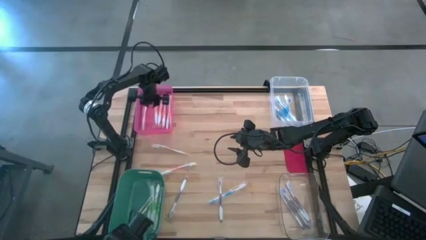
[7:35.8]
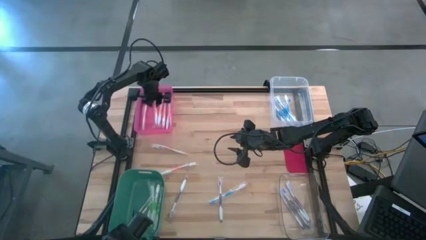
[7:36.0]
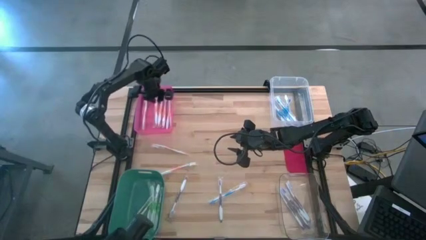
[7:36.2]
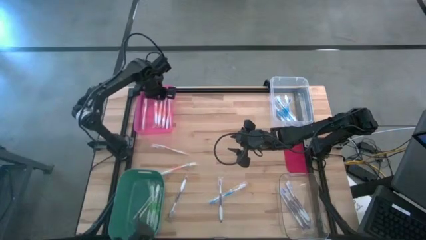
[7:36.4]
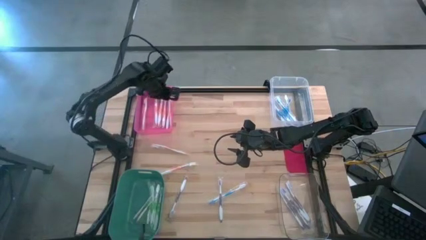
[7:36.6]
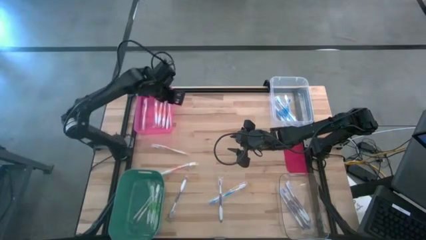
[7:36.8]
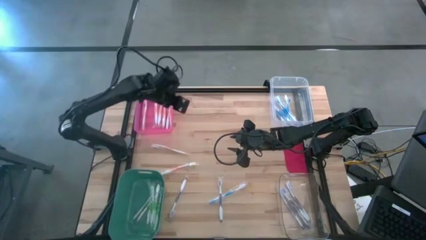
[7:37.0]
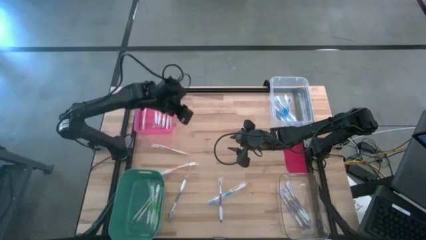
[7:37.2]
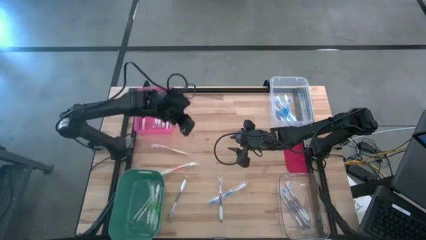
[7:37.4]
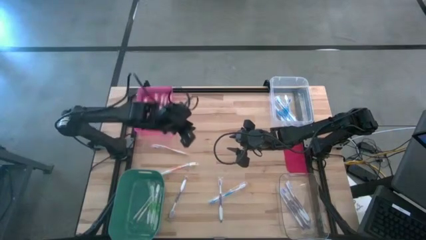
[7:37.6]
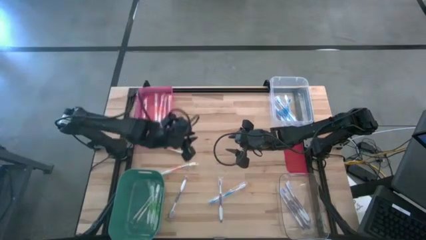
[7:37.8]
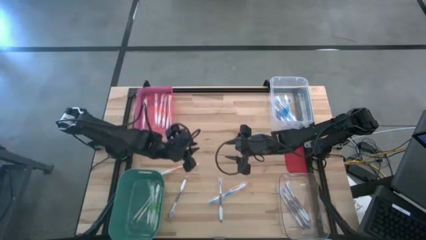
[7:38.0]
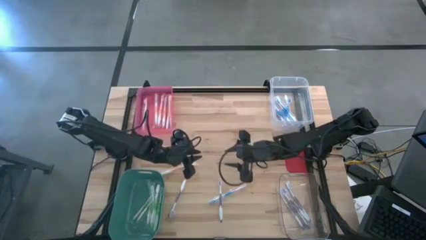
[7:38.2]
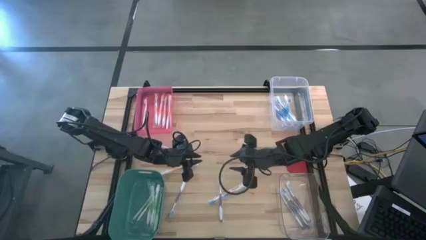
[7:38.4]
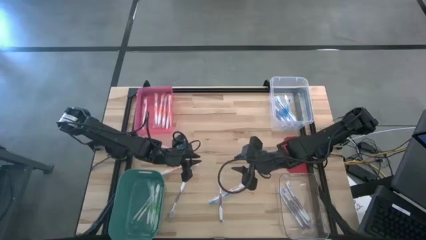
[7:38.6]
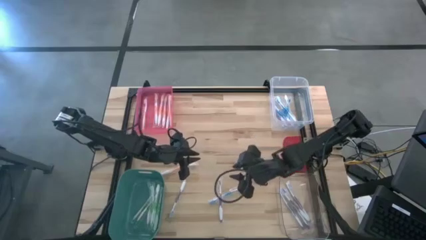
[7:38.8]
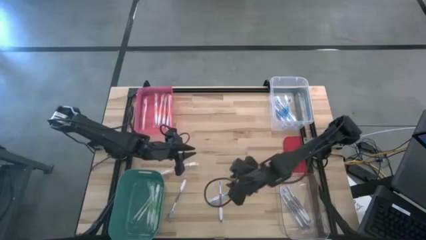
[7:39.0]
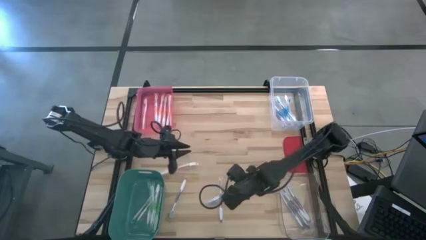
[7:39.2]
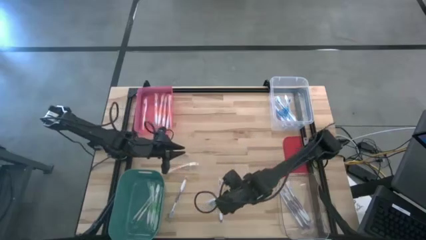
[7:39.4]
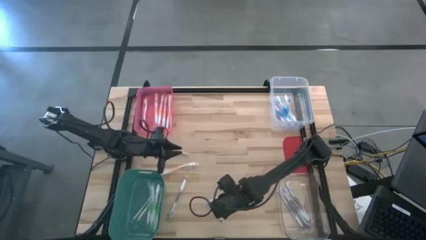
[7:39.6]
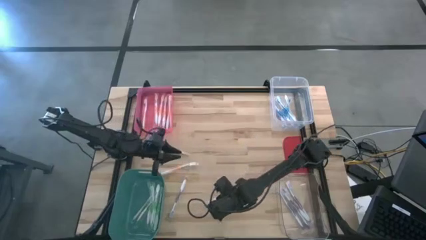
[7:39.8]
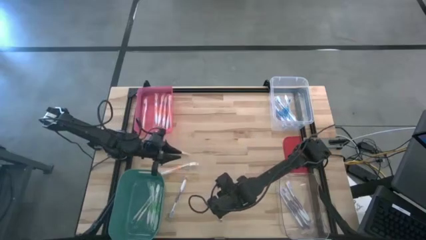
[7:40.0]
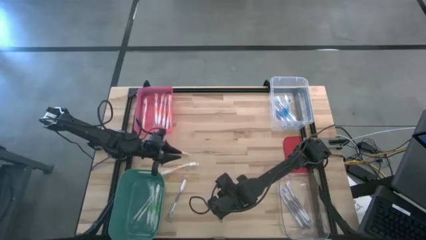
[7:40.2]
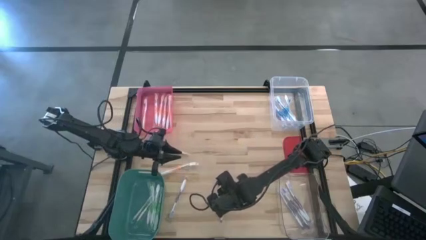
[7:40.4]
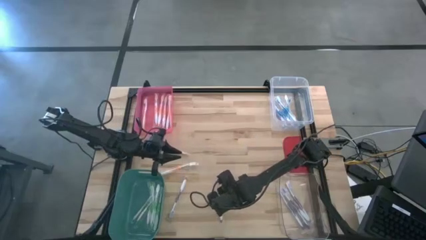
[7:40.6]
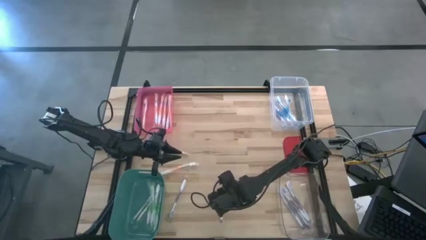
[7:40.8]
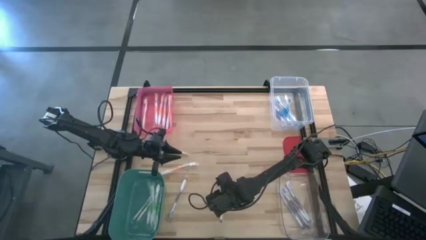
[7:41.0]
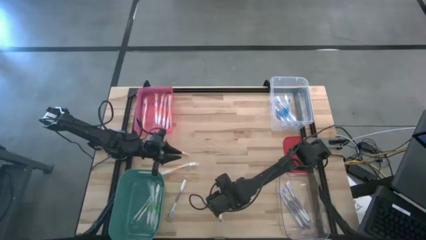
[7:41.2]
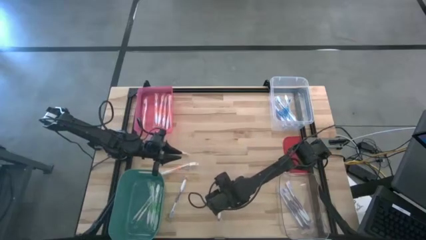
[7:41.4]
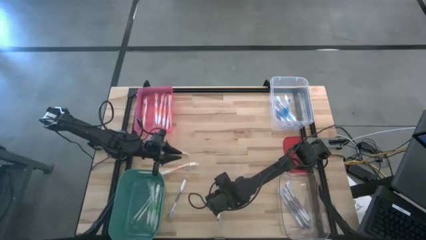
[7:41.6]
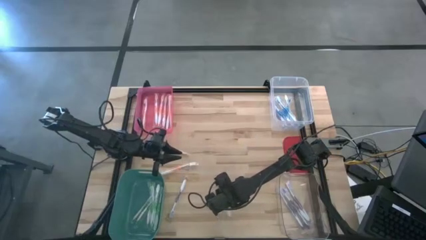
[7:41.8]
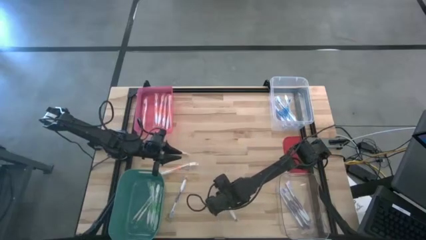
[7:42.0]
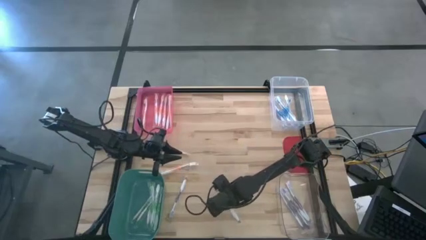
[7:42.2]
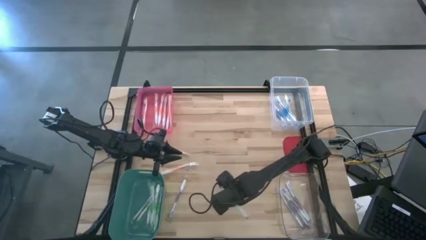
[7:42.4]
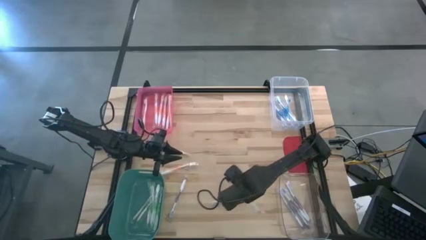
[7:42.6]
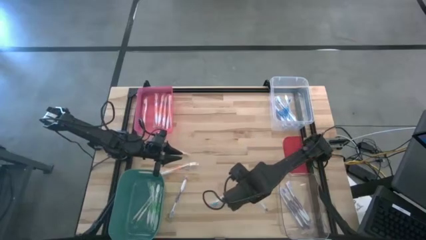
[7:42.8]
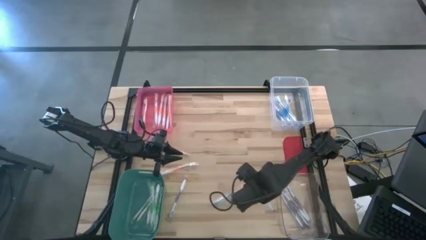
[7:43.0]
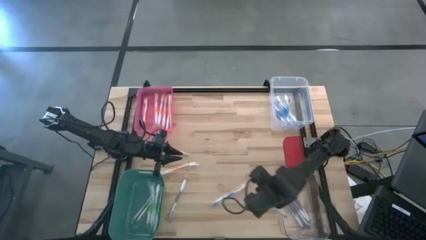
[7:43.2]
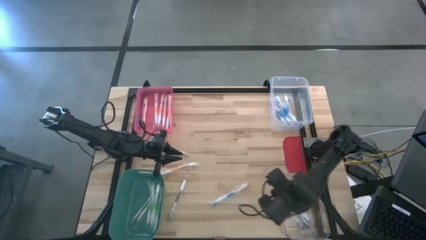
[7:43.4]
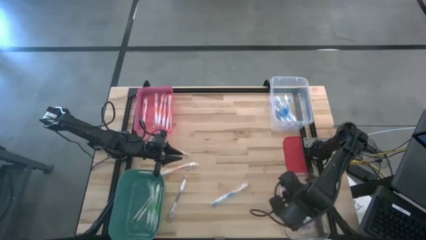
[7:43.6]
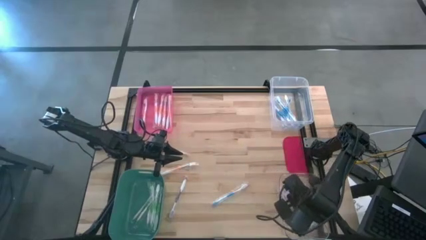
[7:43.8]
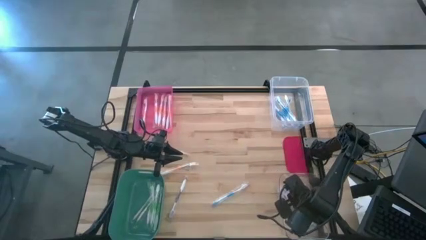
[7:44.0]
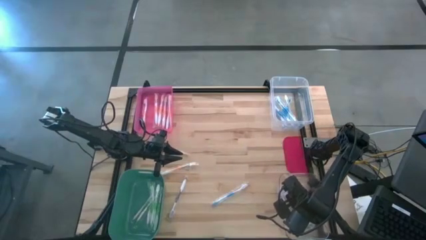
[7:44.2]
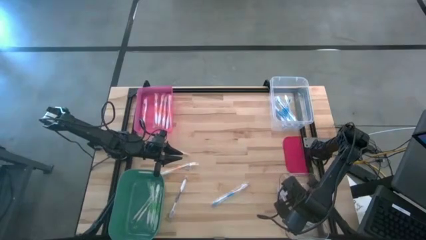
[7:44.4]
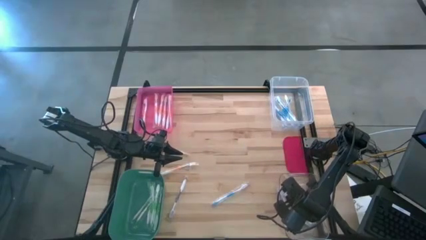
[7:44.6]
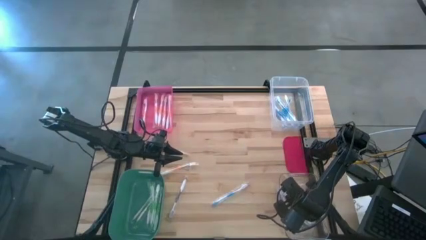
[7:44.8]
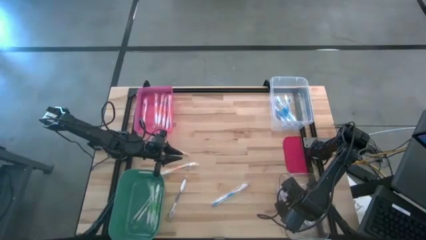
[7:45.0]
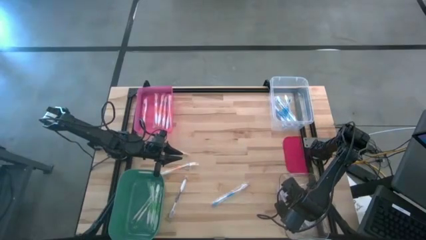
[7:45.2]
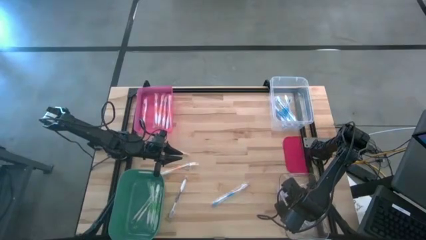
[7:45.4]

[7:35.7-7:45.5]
Task: Pick & Place Toothbrushes
Put the violet toothbrush into the bottom transparent bin

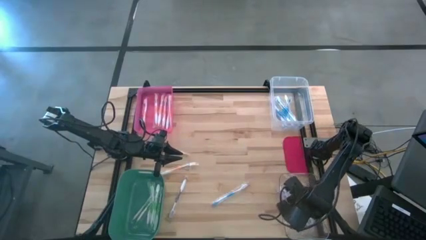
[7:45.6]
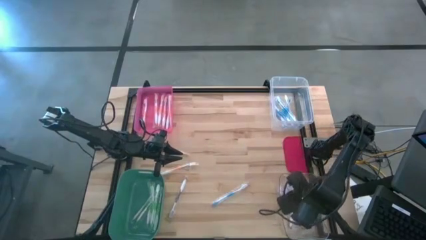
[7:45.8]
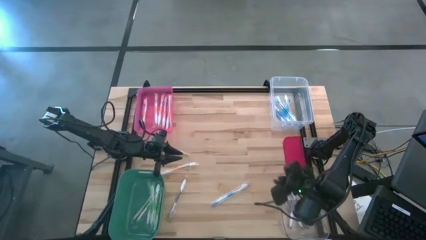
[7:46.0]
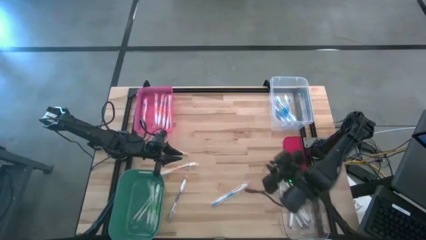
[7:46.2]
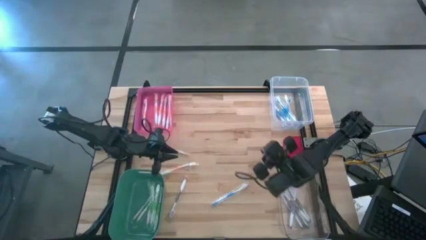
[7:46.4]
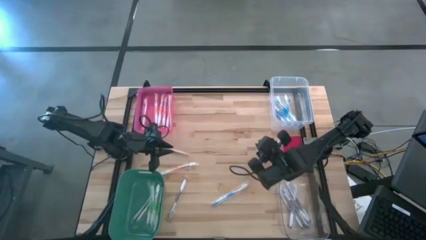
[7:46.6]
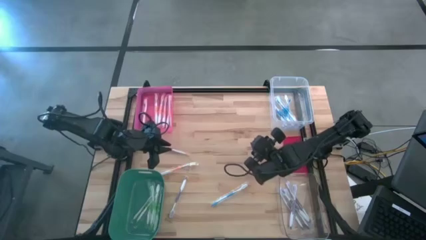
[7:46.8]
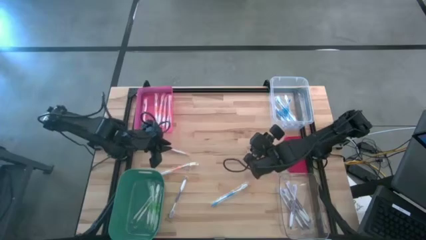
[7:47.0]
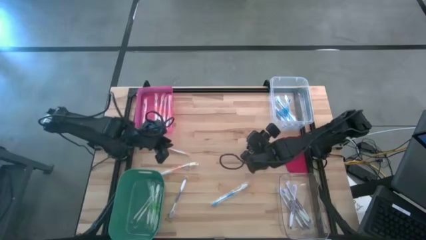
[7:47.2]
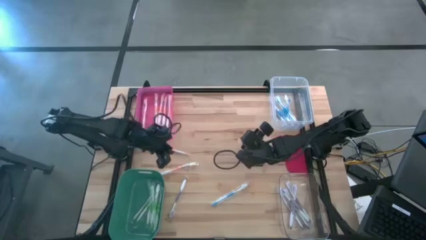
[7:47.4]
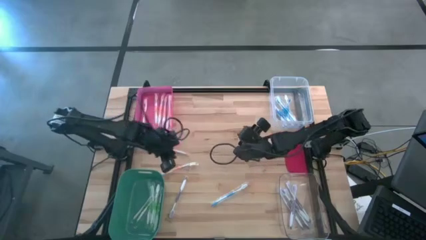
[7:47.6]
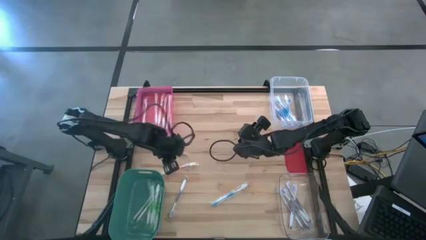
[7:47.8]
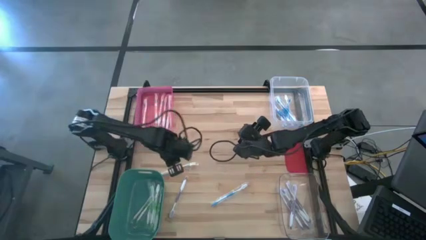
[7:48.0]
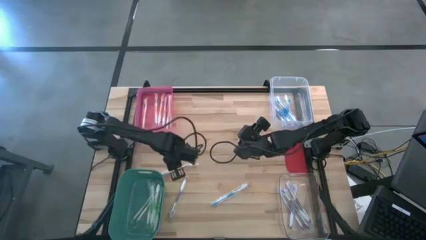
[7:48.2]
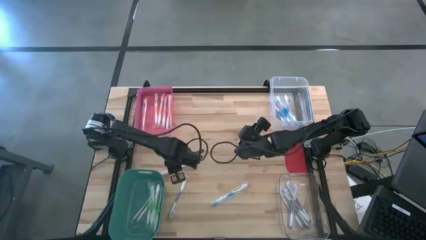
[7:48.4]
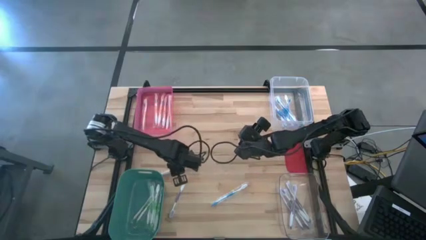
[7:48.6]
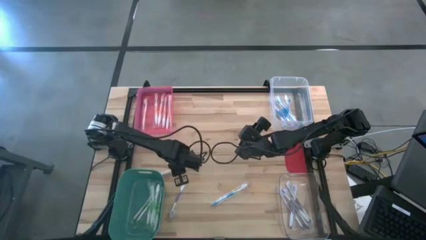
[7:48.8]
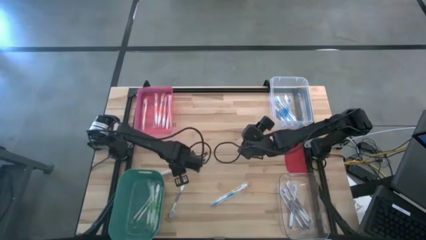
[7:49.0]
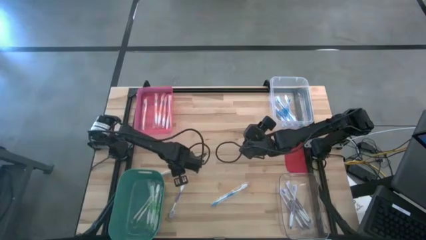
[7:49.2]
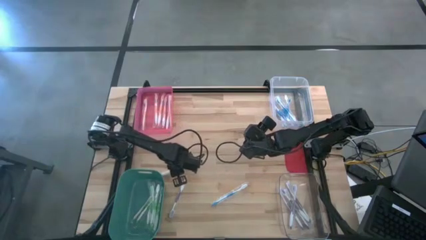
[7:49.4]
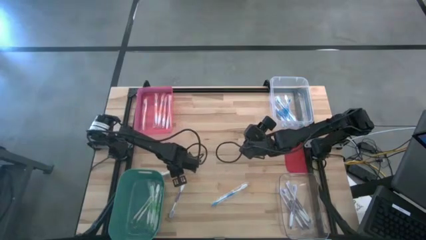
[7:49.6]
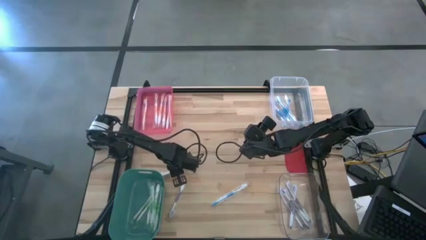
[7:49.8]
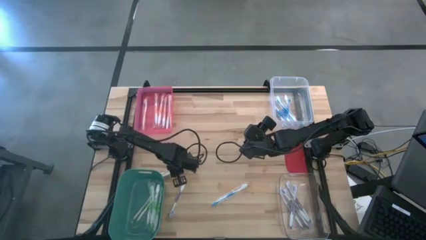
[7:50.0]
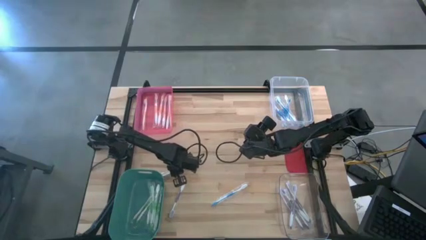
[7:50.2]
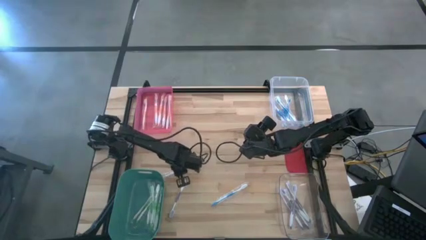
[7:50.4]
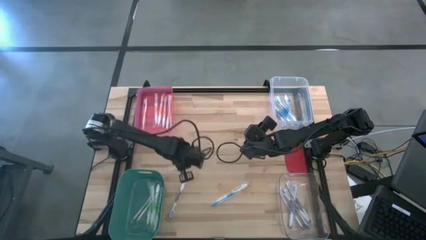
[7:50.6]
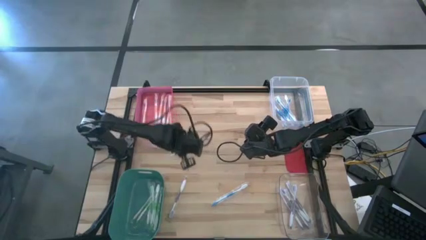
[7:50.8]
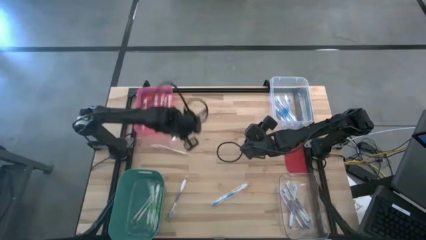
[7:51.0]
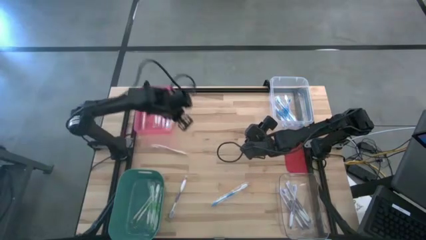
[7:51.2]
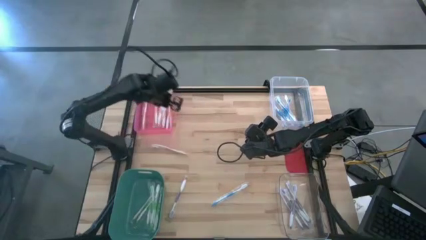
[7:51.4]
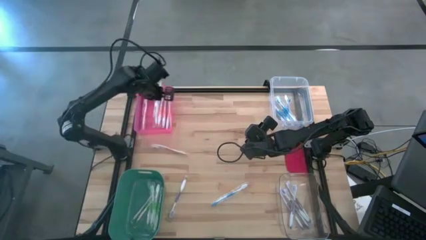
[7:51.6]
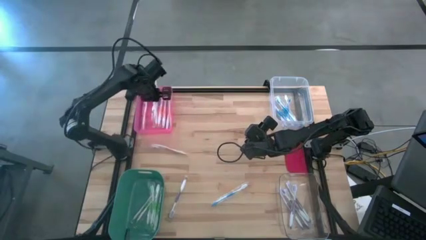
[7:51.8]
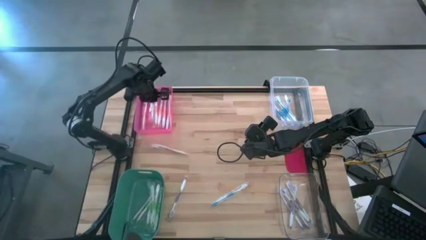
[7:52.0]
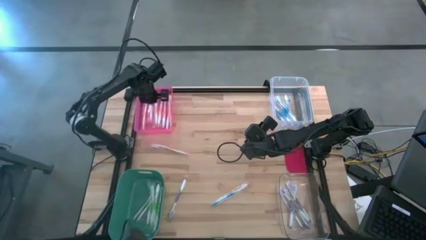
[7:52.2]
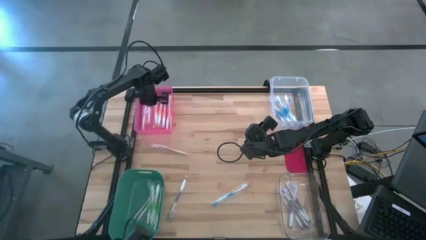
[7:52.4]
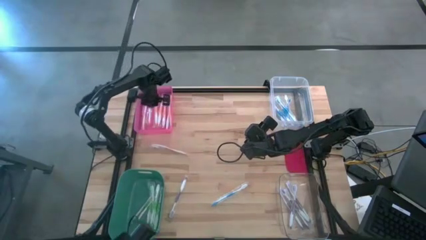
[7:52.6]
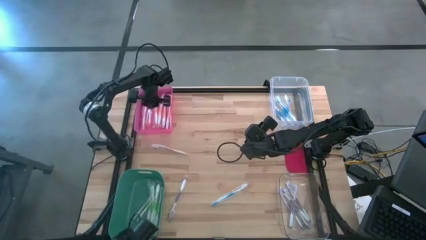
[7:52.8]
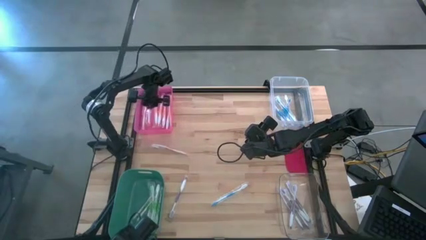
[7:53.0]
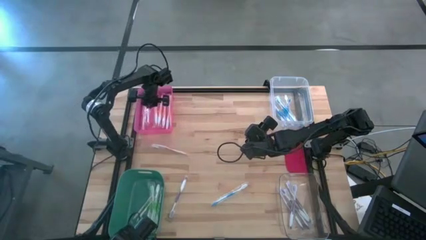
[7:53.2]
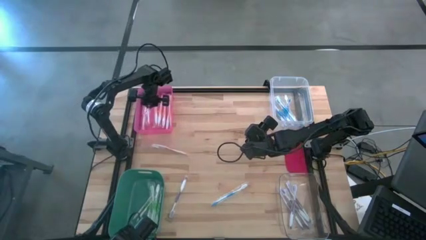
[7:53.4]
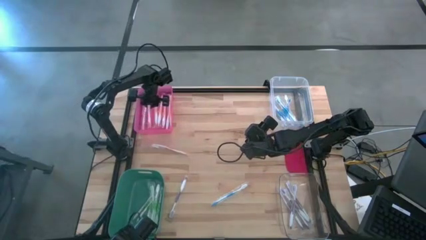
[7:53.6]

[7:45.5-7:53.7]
Put the orange toothbrush into the pink bin
